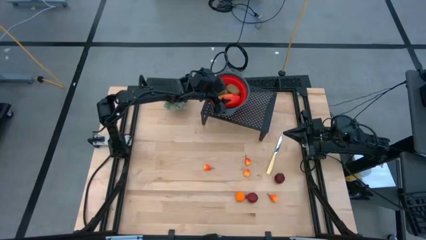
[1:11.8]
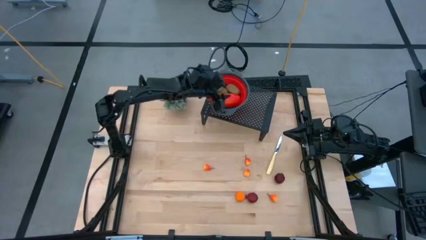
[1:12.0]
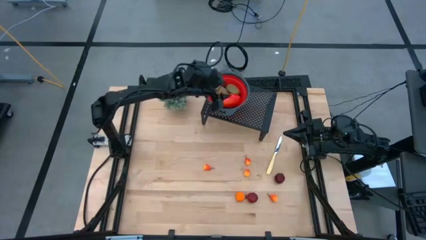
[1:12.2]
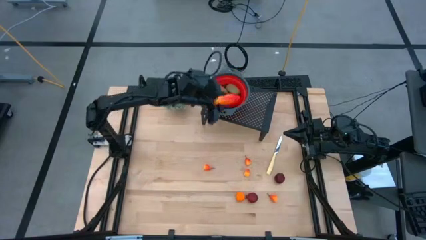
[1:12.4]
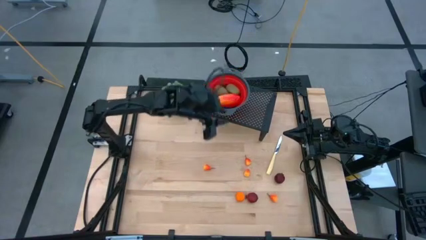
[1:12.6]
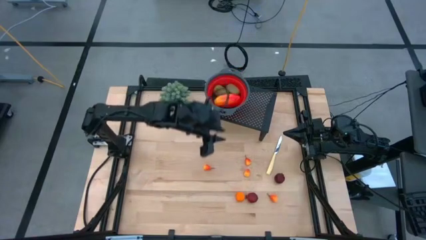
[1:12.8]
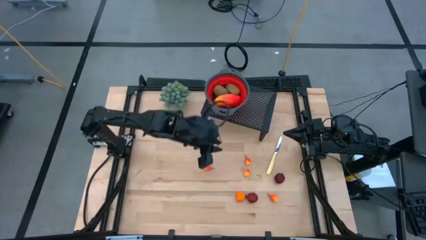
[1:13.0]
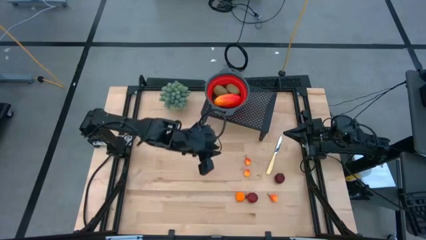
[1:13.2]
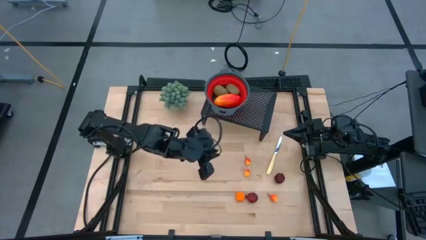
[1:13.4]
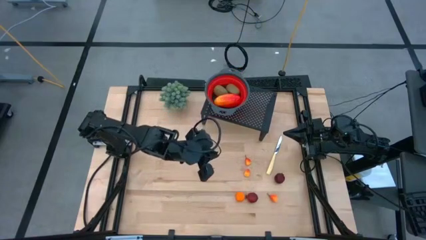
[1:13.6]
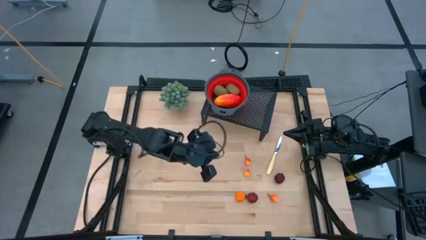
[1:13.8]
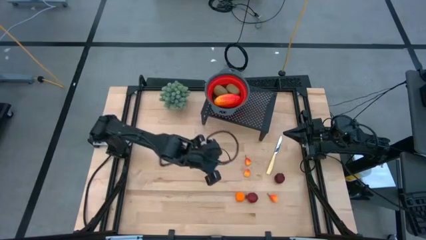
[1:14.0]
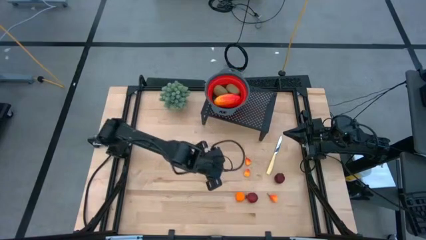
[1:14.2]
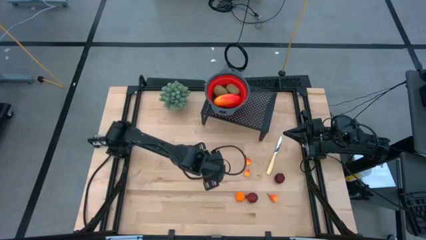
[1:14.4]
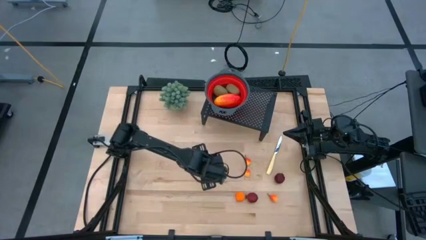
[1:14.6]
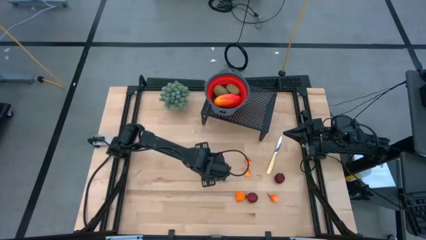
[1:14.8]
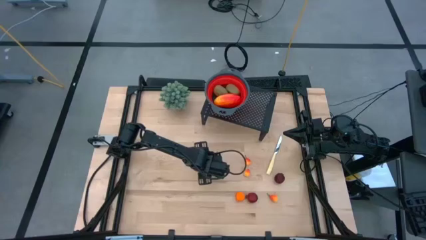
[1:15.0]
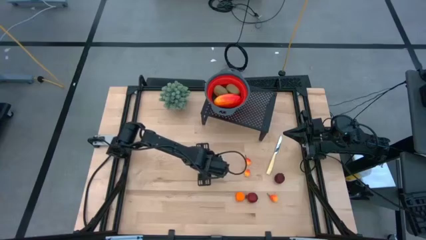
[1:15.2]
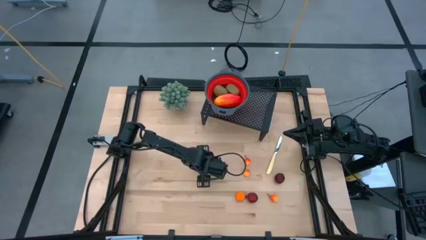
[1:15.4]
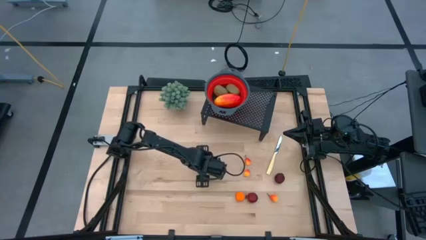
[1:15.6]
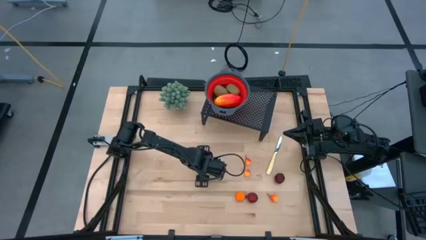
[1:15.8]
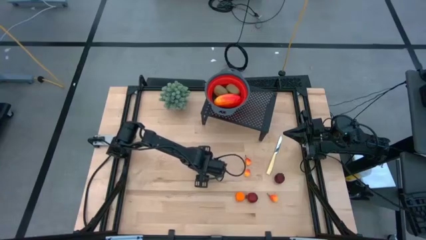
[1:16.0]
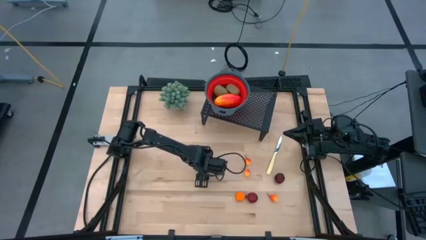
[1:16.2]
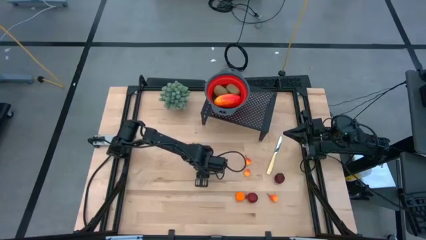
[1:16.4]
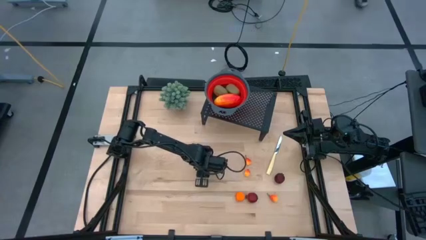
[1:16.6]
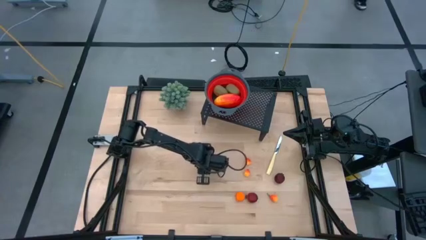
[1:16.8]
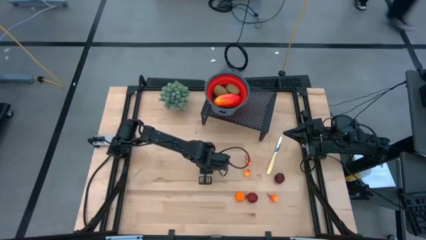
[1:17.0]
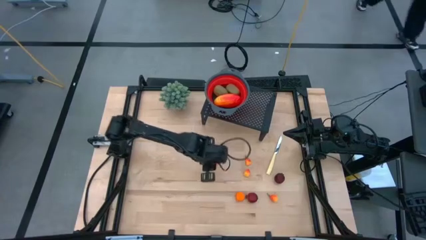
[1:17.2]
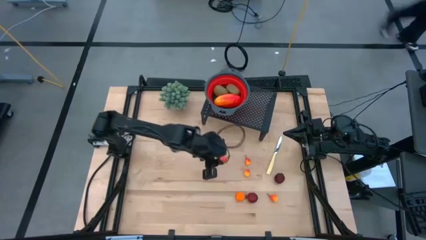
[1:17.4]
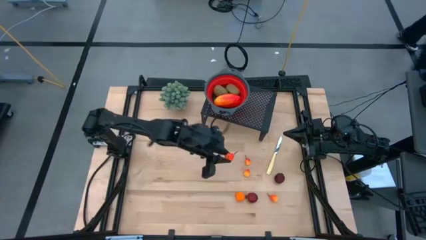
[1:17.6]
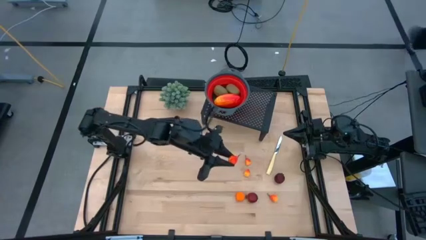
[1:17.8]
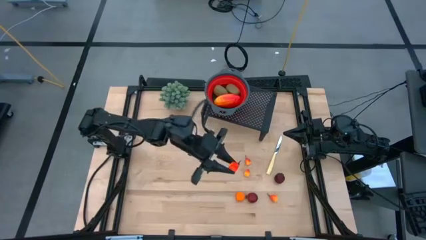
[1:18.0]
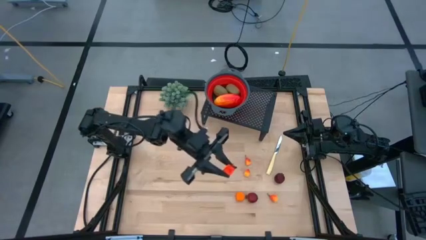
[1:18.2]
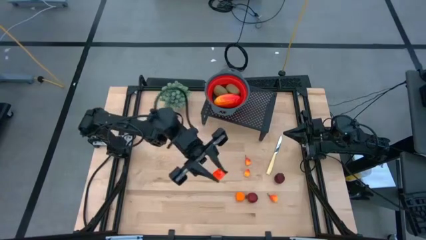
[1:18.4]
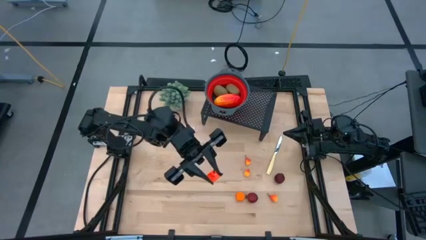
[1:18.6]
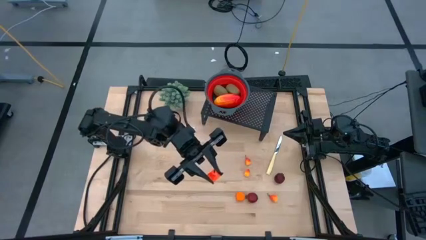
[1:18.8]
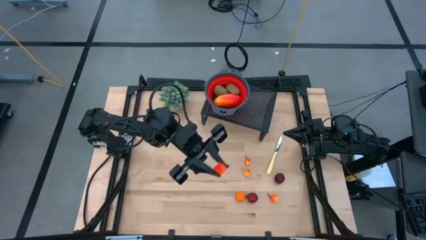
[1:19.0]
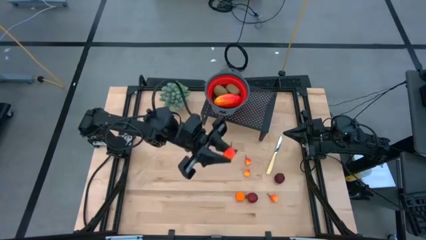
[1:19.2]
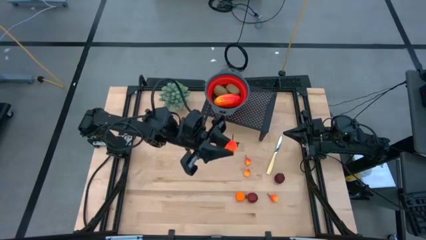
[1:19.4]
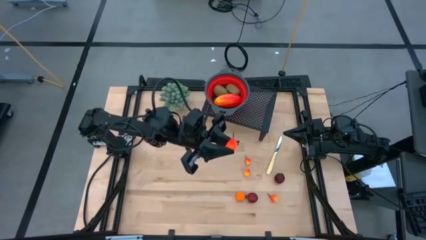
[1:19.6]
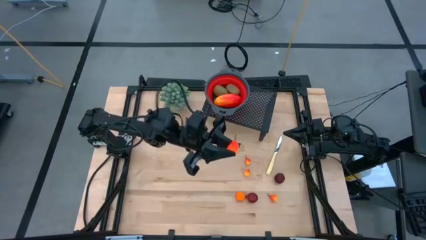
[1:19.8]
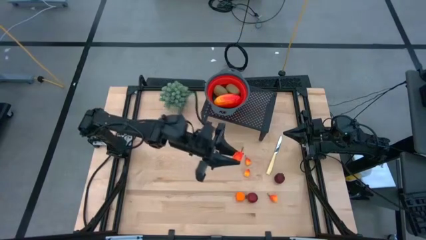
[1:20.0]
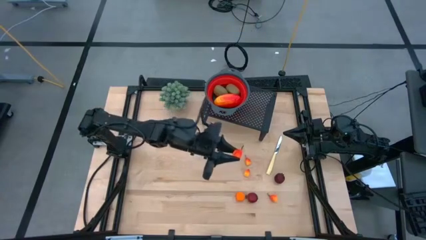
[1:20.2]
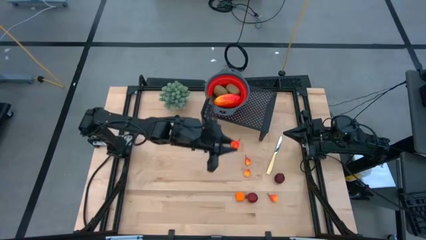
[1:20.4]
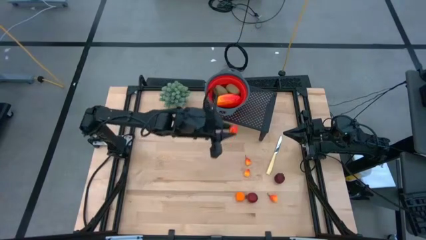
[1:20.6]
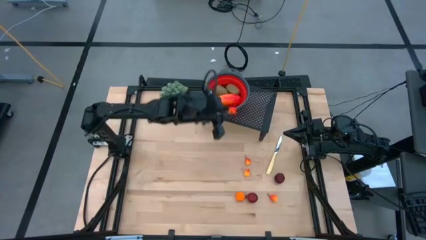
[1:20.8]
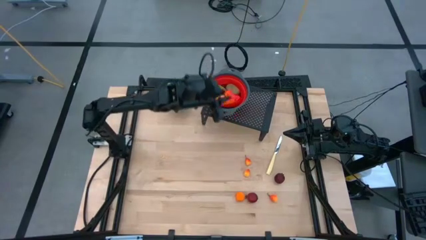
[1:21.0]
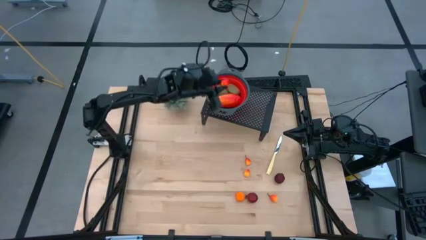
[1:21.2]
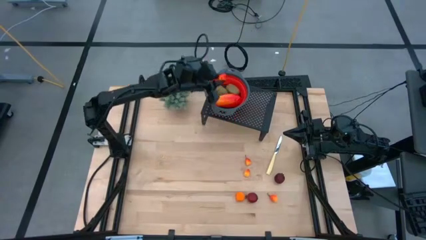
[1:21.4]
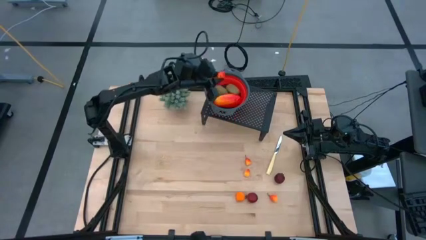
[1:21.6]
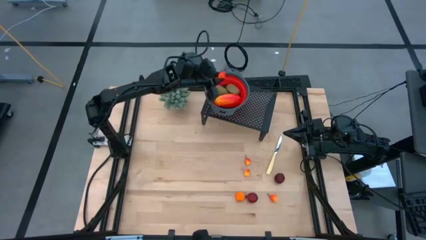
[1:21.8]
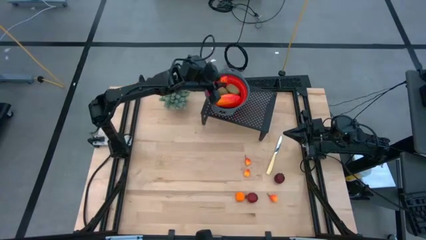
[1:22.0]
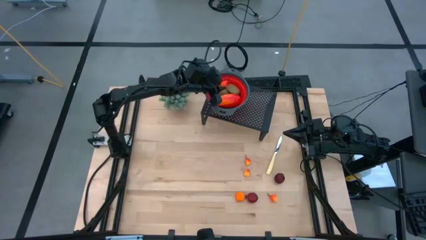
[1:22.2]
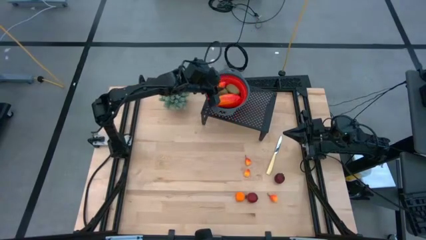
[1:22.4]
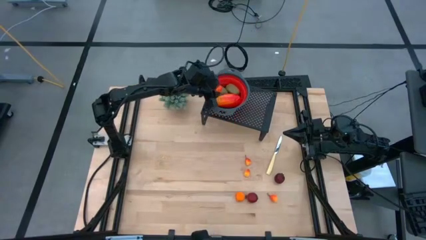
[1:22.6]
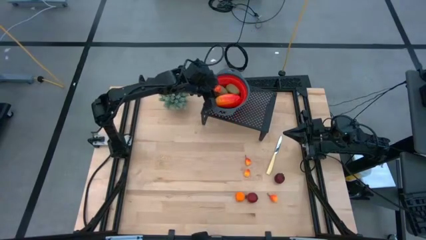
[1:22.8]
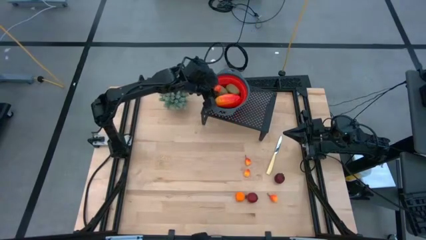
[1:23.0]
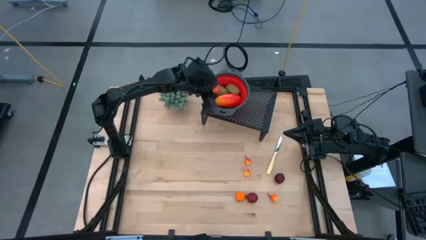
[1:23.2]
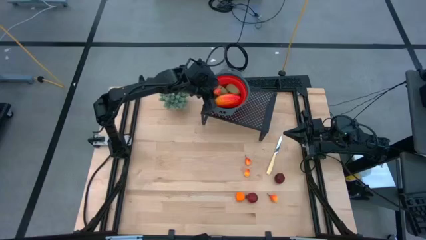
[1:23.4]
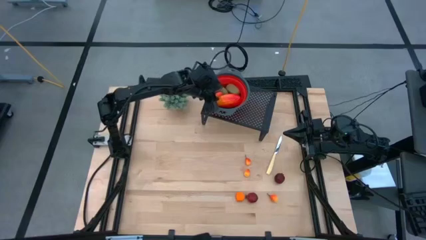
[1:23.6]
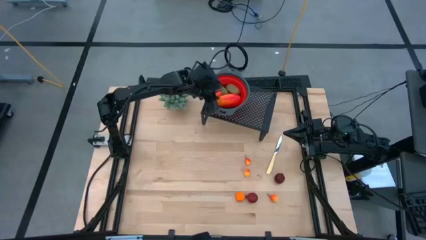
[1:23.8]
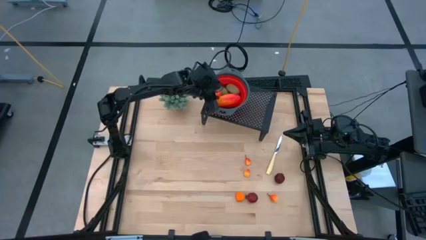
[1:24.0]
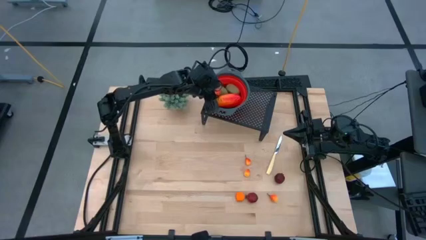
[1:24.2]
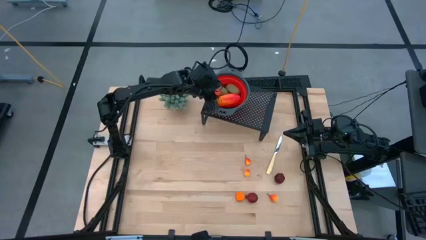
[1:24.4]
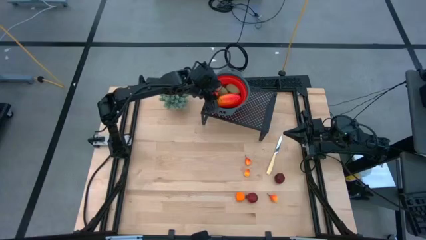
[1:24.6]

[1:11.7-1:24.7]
Task: Pick & Place Fruit
Put the pear into the red strainer bowl
